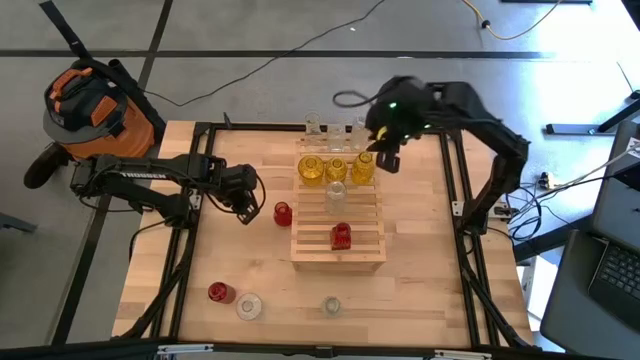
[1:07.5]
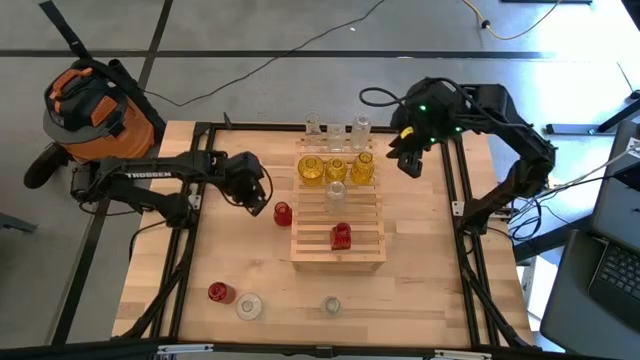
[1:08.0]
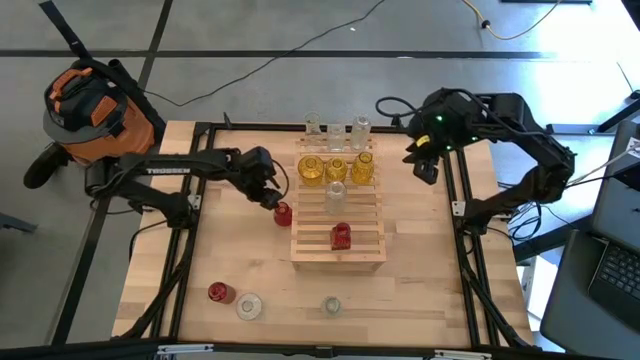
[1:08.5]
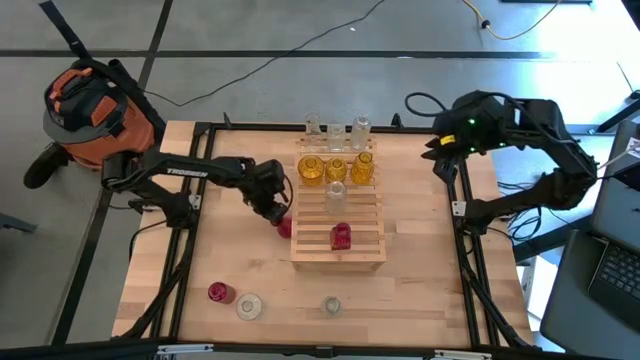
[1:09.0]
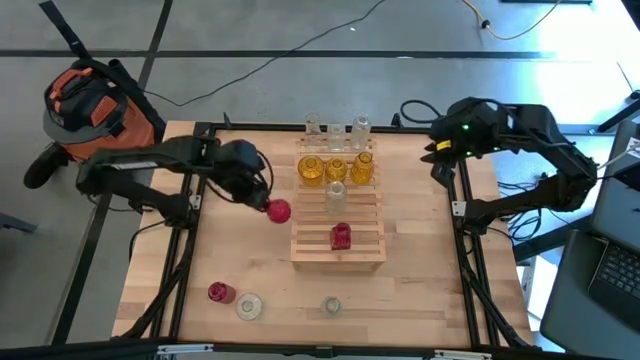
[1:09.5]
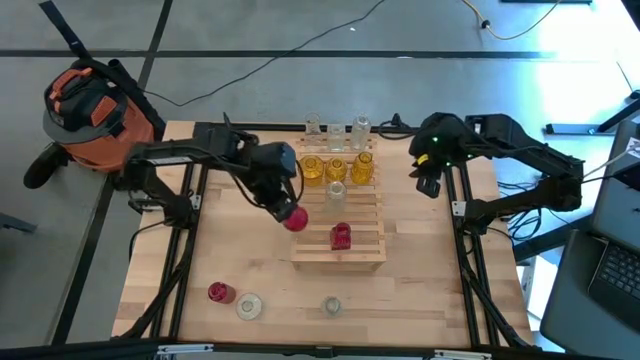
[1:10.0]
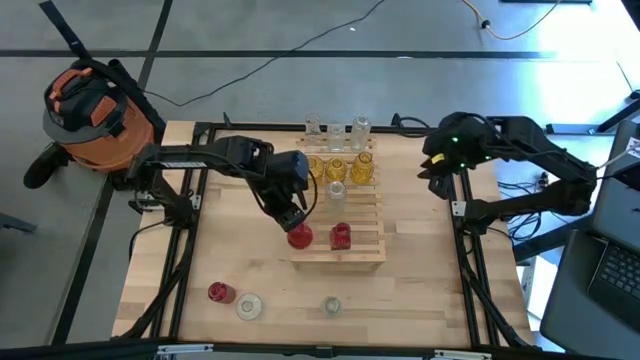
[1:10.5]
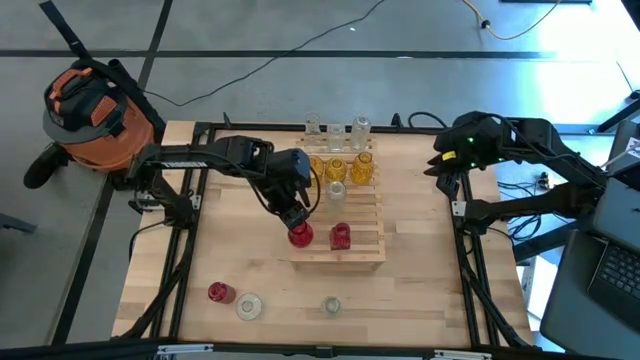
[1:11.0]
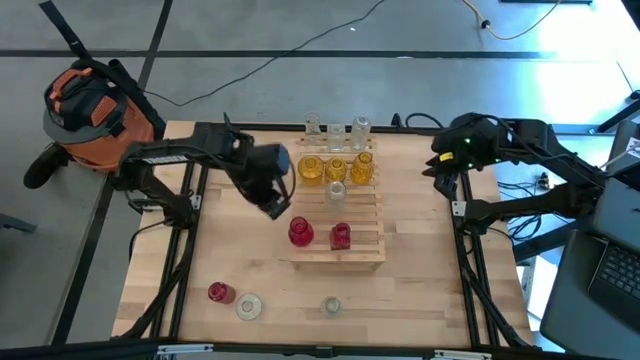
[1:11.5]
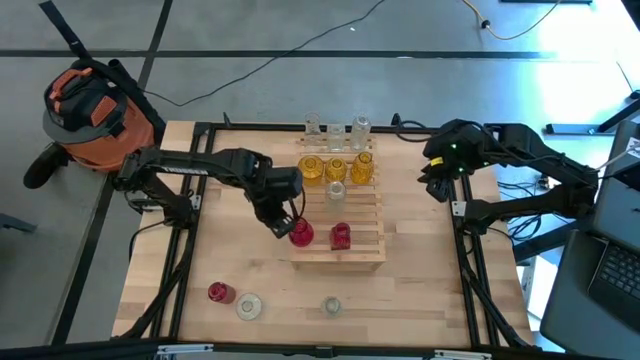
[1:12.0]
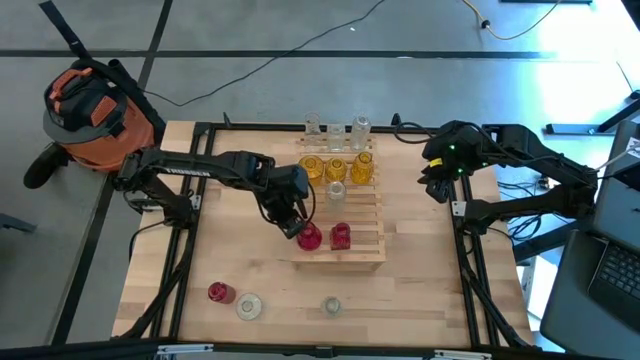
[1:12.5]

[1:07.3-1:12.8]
Task: sort vases onto shelf
Align the red vase with the red vase on the shelf

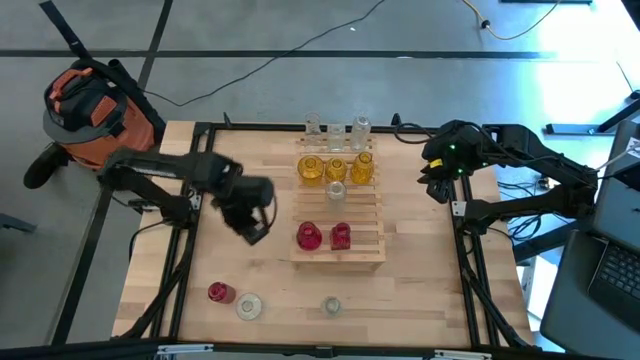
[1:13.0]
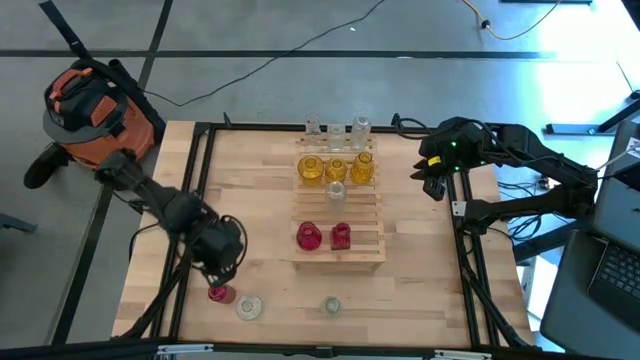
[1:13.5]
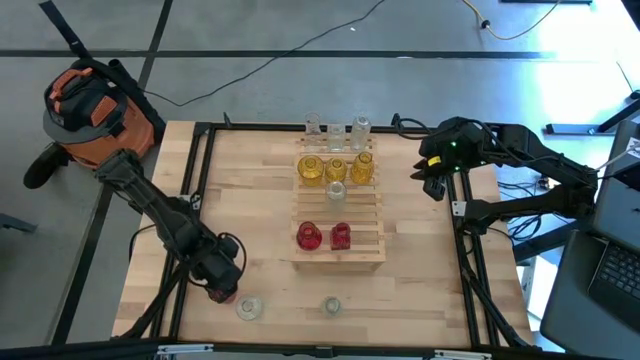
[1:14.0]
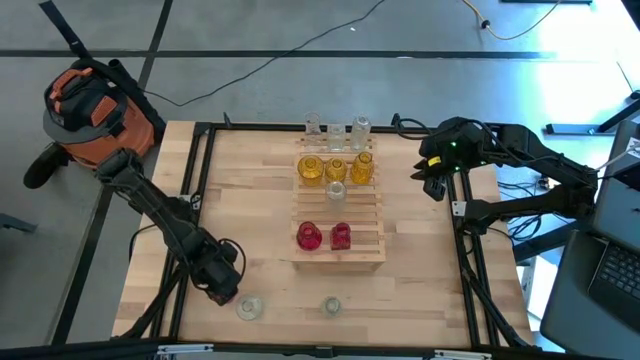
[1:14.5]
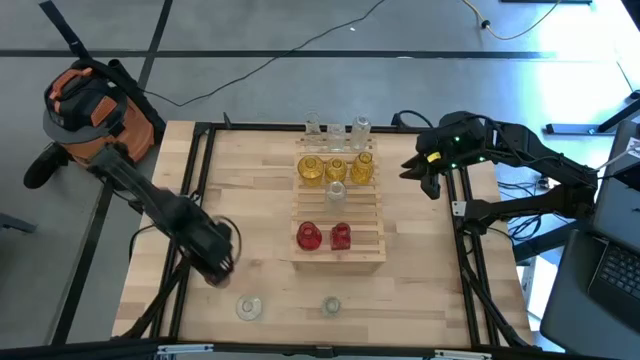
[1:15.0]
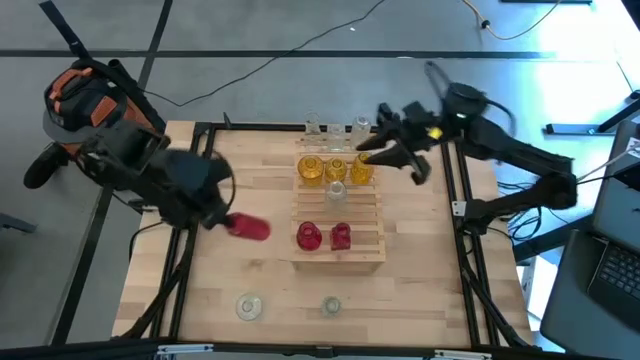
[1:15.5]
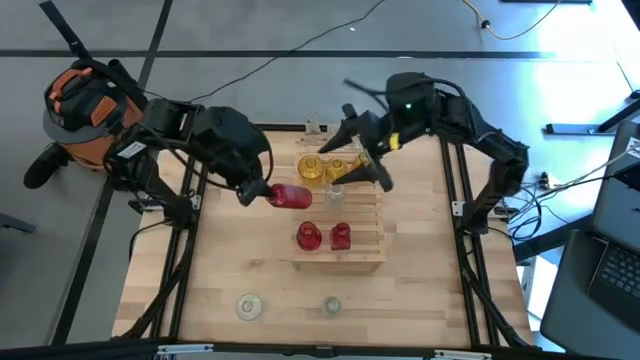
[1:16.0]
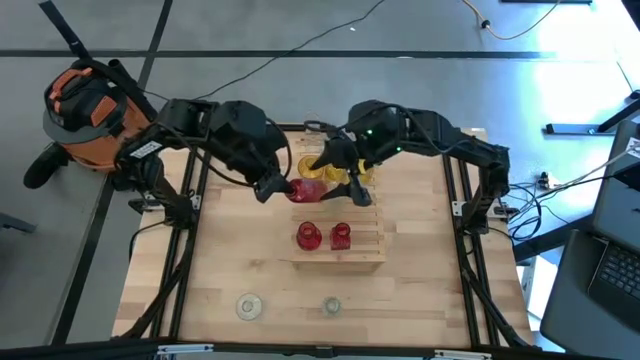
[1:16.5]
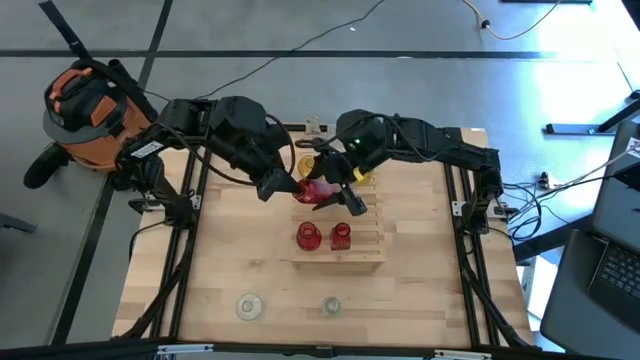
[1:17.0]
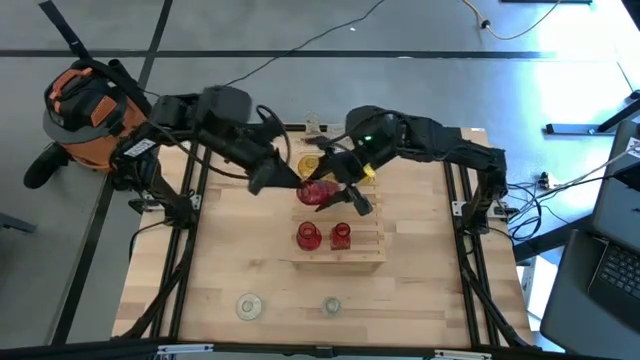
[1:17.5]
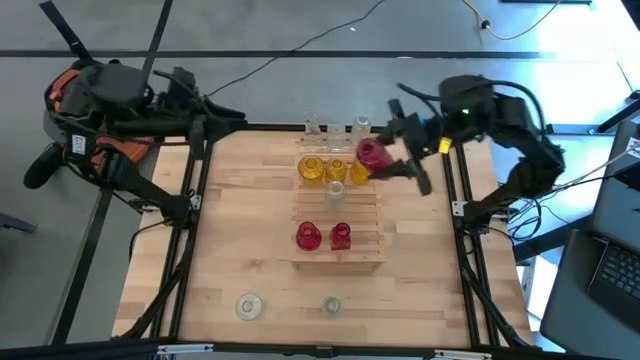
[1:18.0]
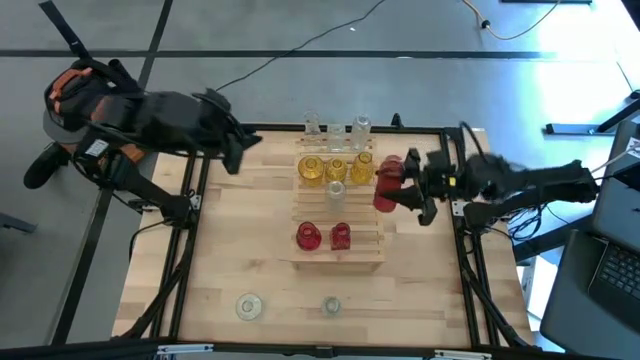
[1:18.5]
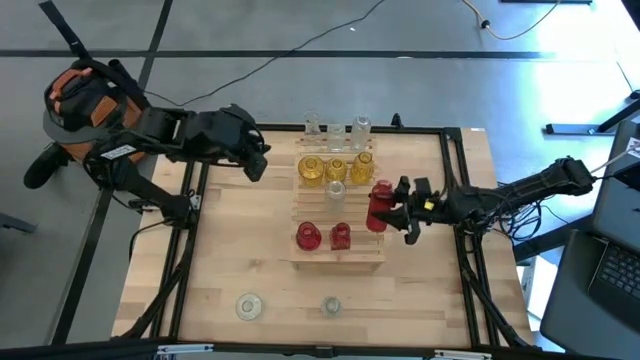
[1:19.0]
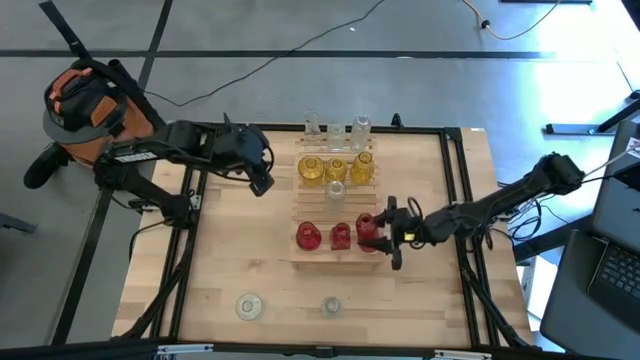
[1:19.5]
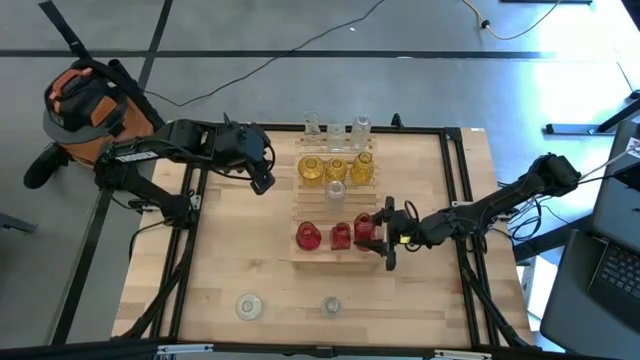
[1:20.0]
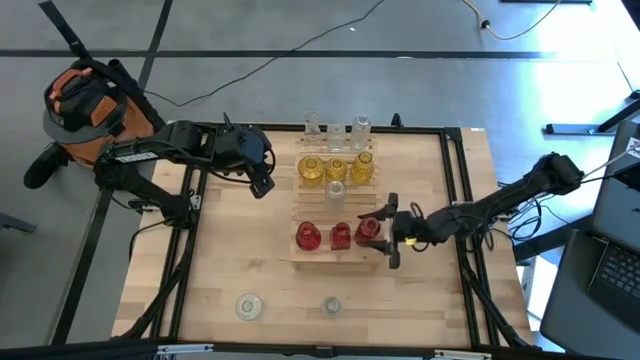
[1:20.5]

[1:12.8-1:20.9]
Align the red vase with the red vases on the shelf

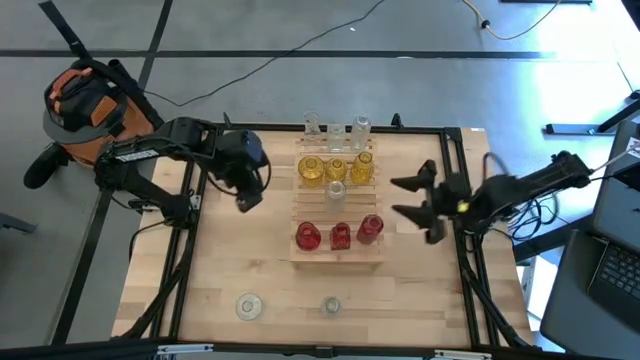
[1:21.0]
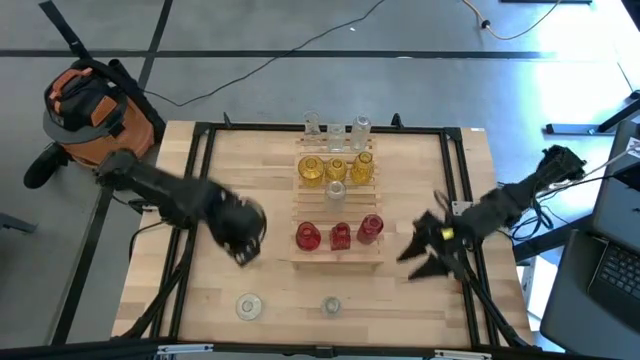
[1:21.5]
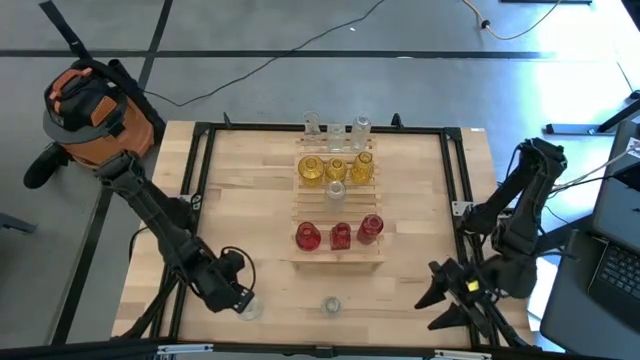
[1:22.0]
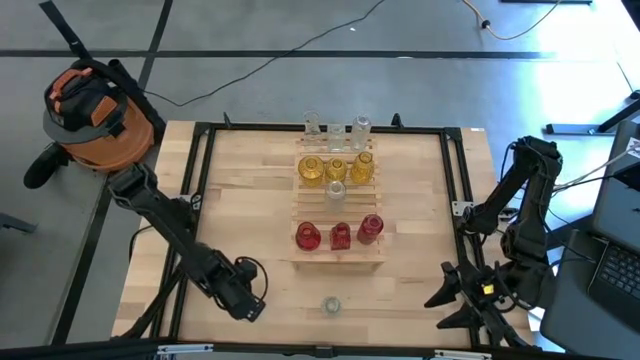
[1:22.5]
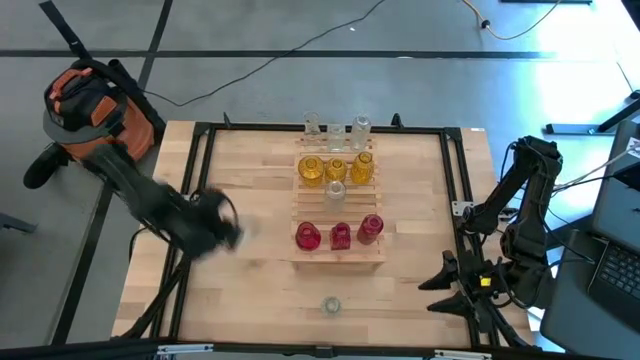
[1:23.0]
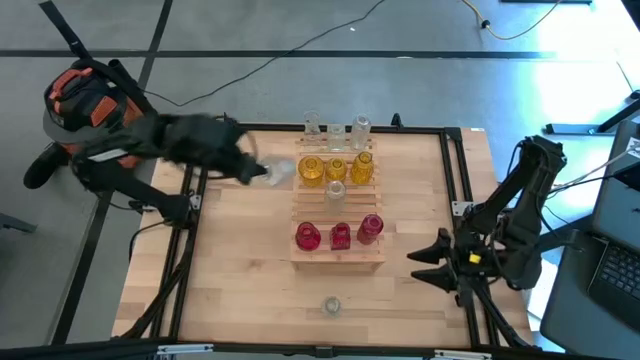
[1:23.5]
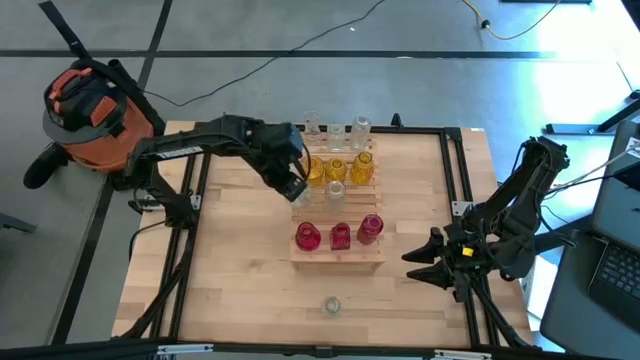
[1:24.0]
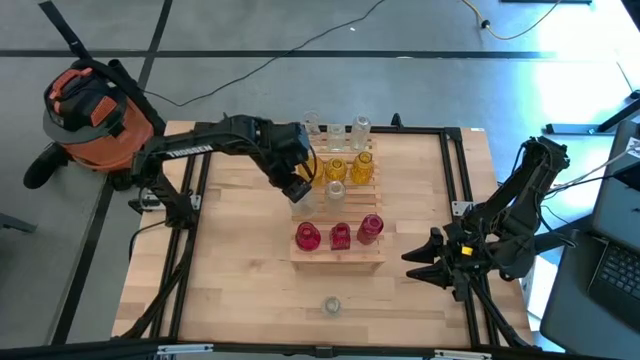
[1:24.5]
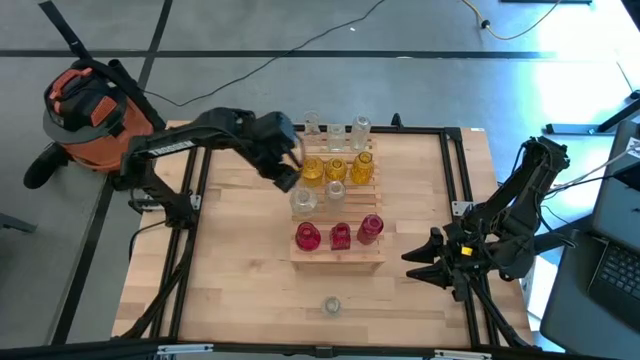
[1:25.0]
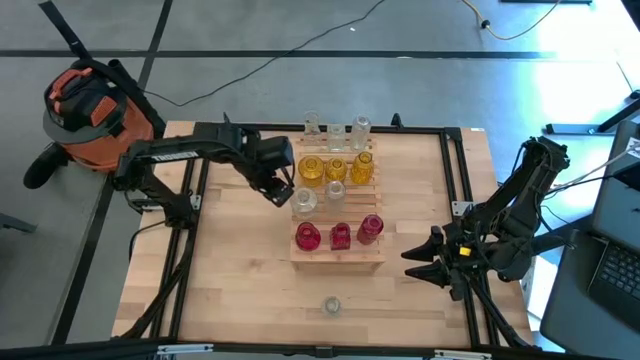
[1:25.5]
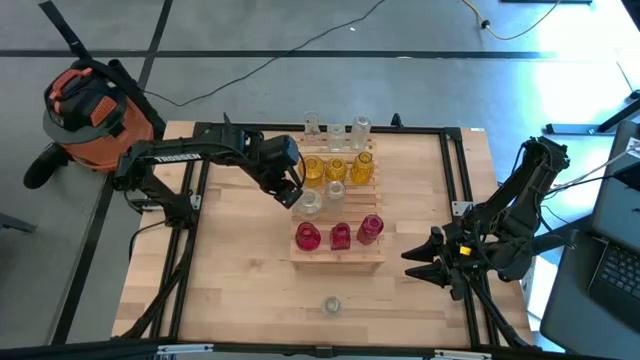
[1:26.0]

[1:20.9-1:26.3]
Align the transparent vase with the transparent vase on the shelf

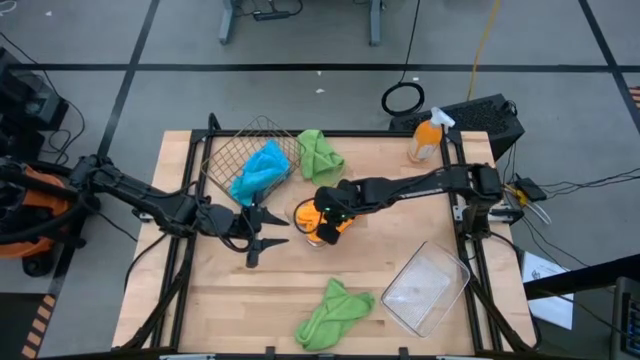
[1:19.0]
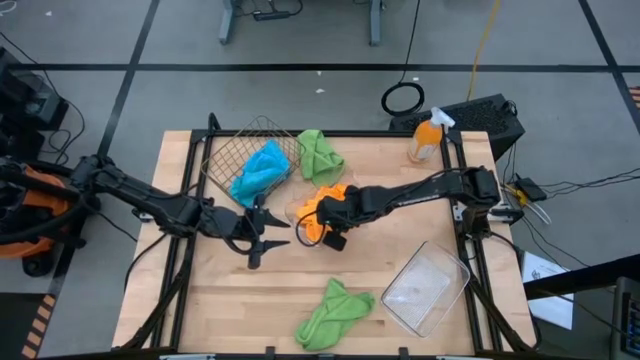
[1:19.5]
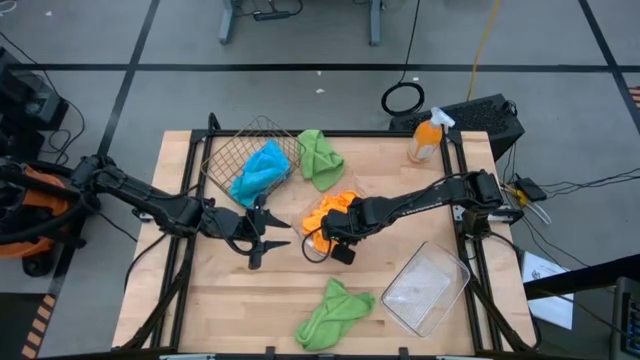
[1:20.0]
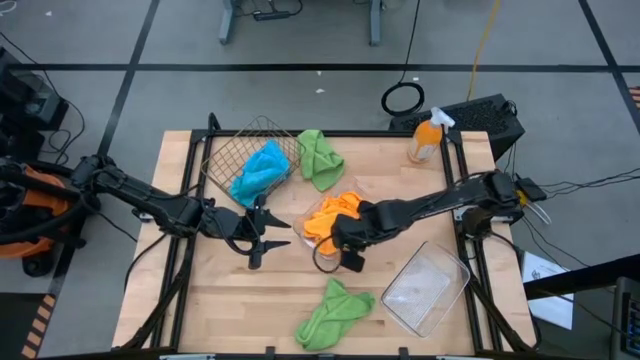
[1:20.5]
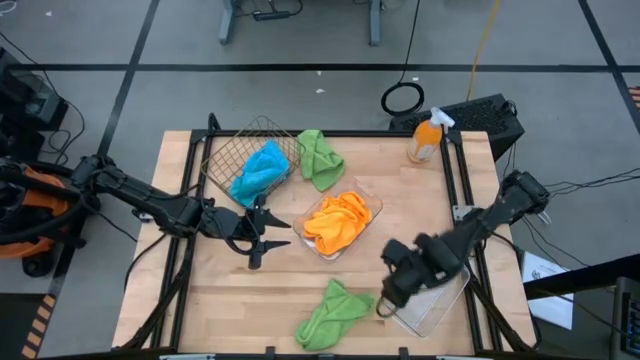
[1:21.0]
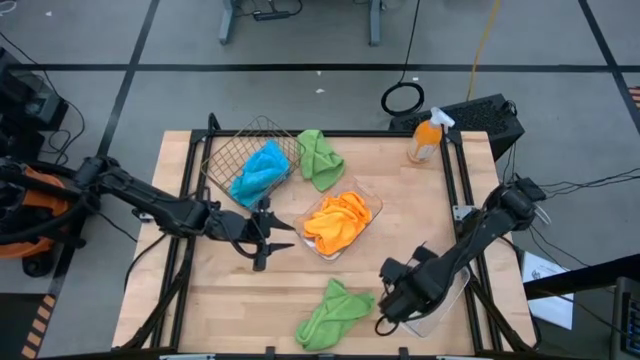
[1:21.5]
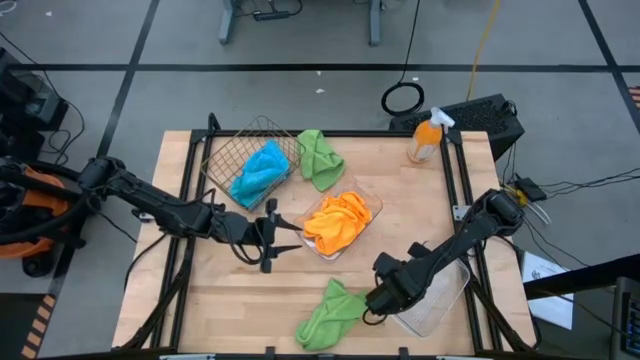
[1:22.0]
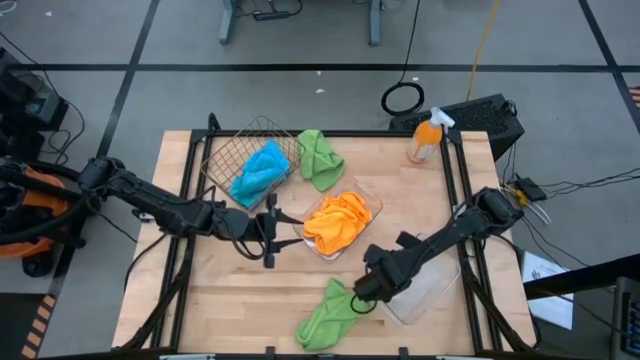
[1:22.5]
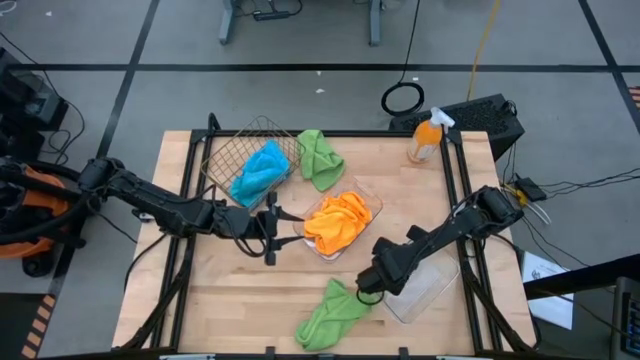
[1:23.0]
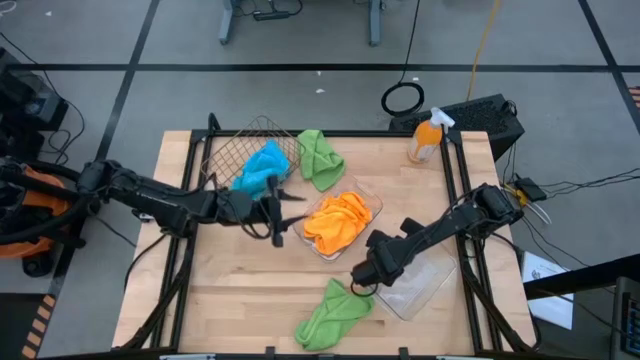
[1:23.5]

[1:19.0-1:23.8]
Task: Sort microfiber towel by color & place in baskets
Adjust the transparent bin
